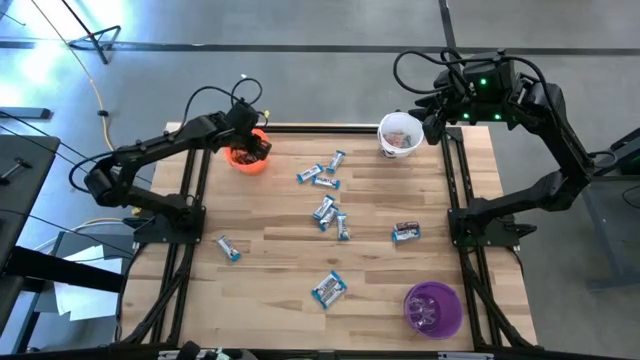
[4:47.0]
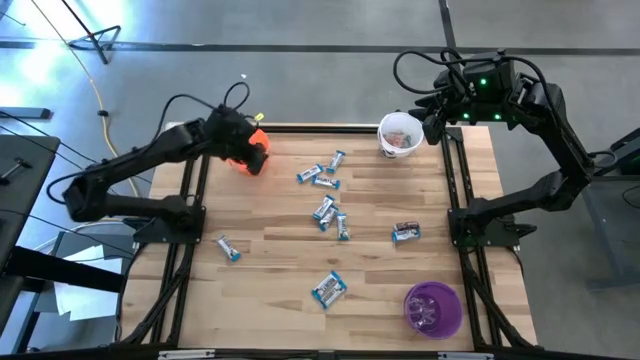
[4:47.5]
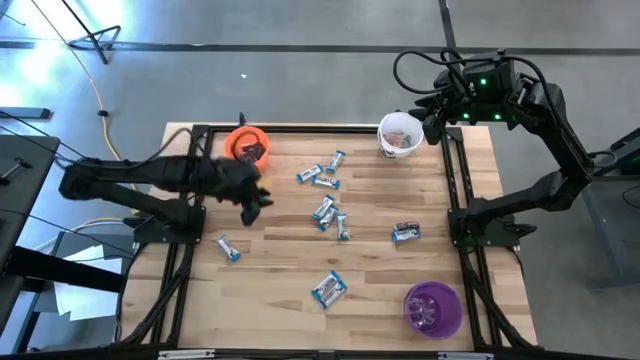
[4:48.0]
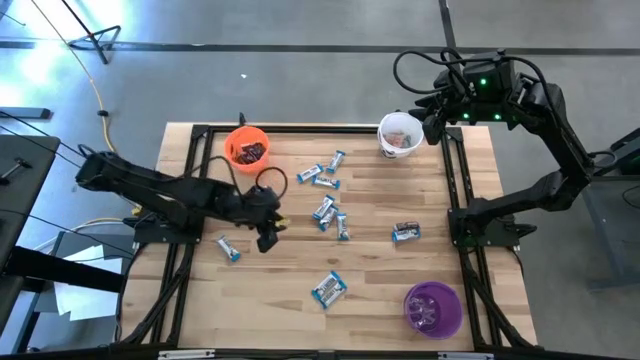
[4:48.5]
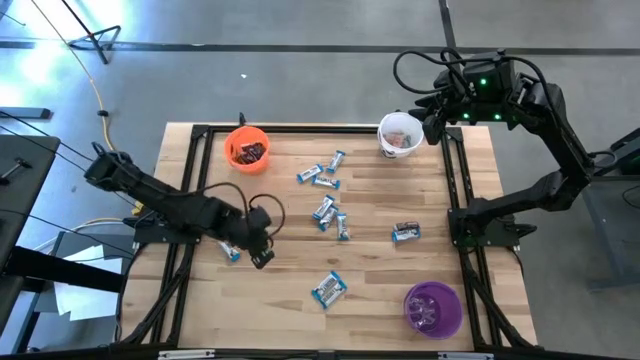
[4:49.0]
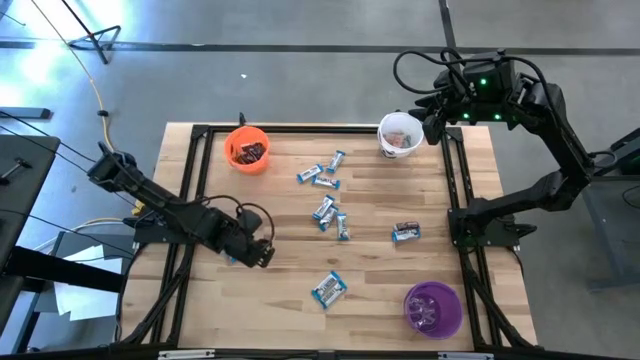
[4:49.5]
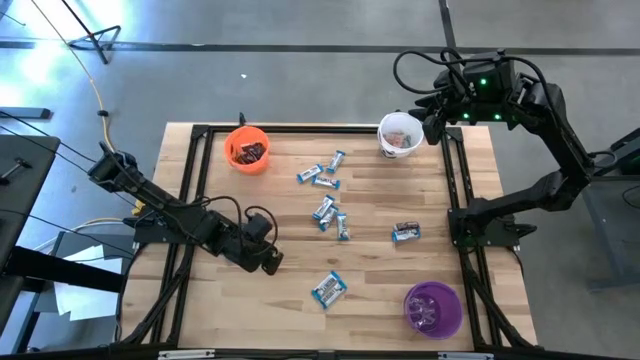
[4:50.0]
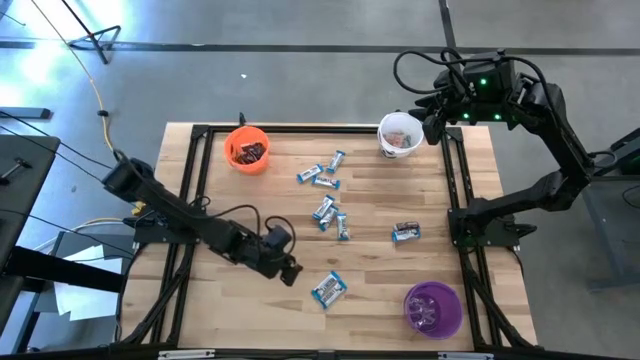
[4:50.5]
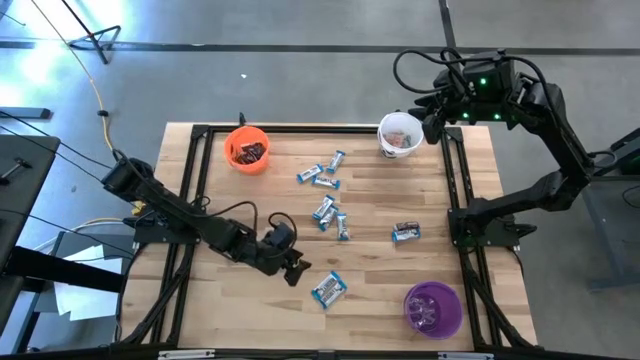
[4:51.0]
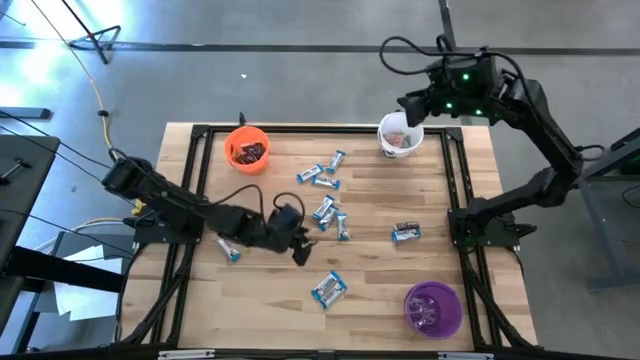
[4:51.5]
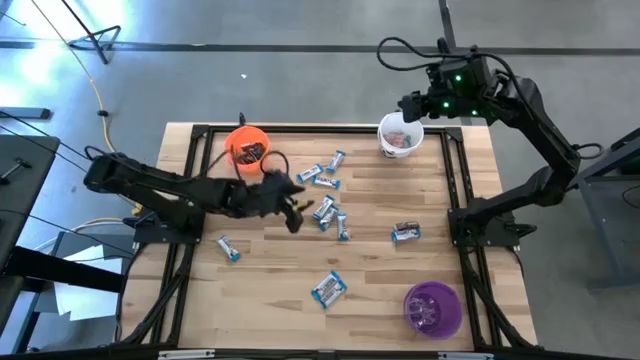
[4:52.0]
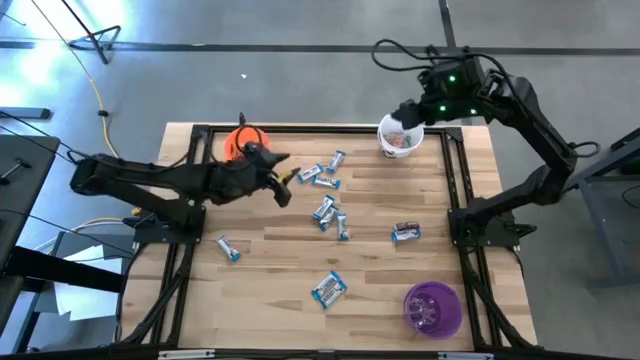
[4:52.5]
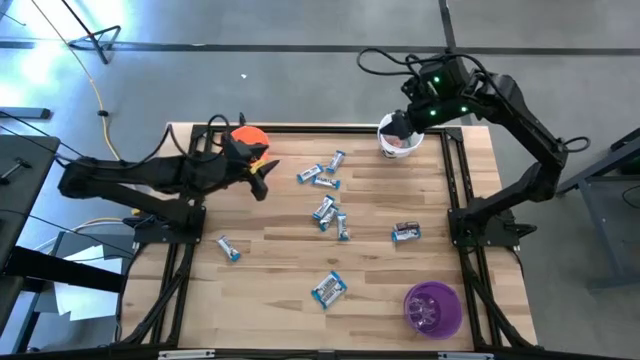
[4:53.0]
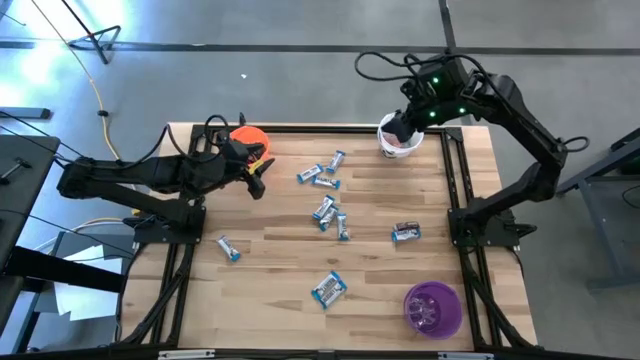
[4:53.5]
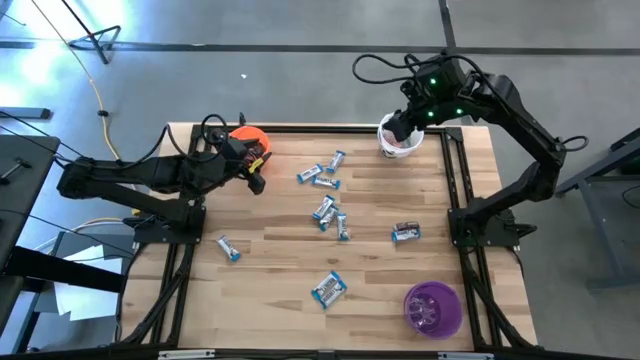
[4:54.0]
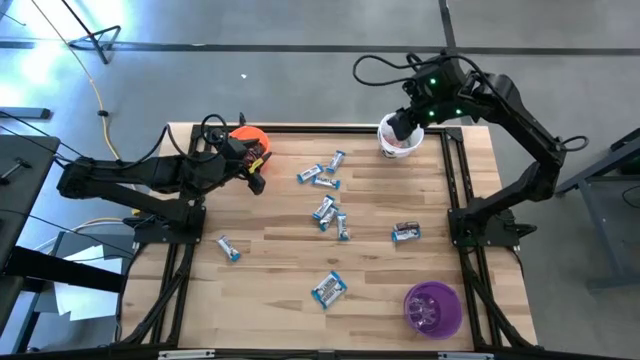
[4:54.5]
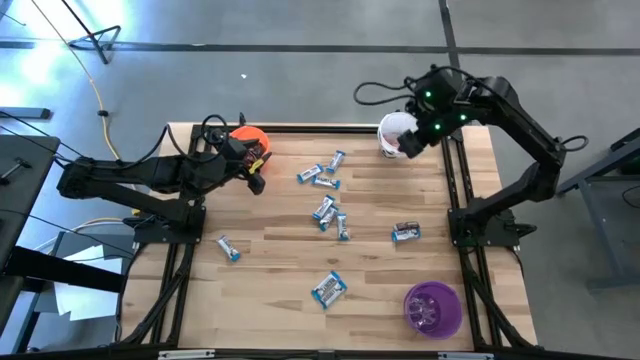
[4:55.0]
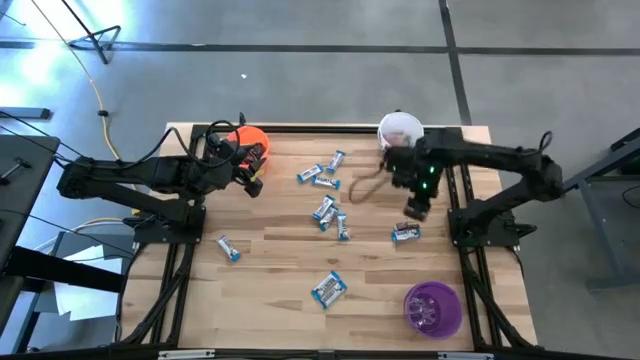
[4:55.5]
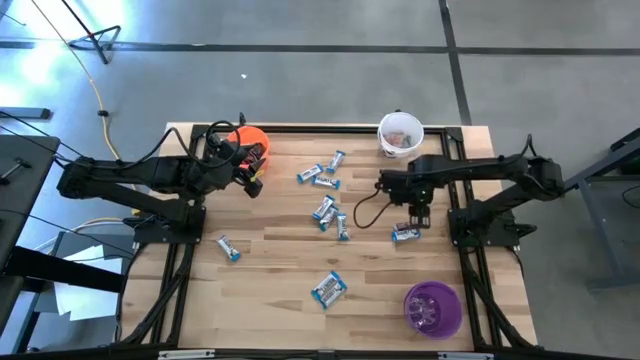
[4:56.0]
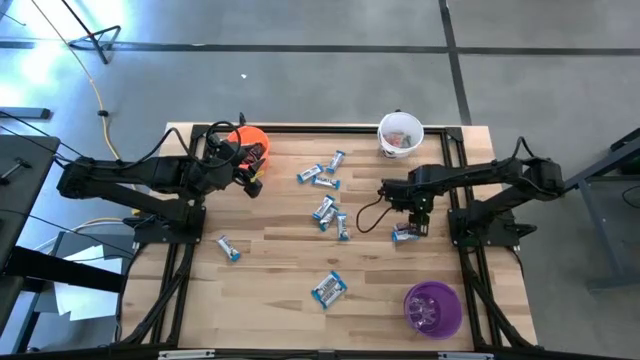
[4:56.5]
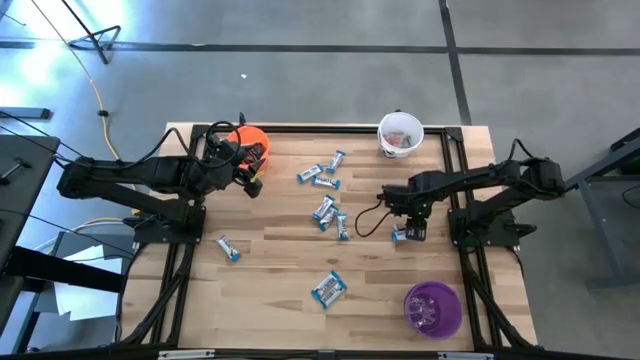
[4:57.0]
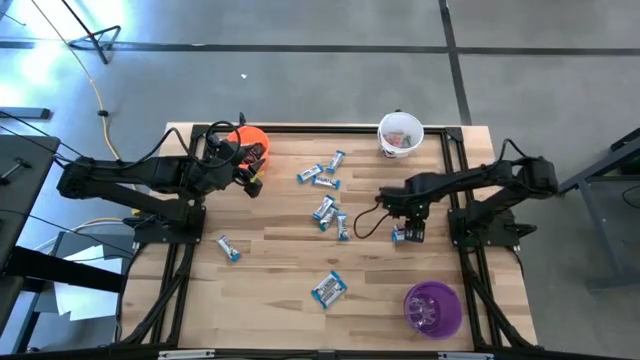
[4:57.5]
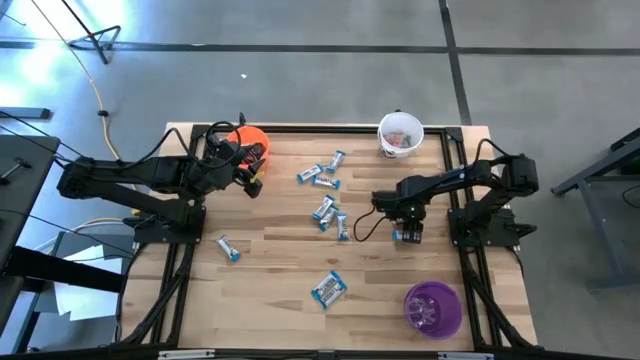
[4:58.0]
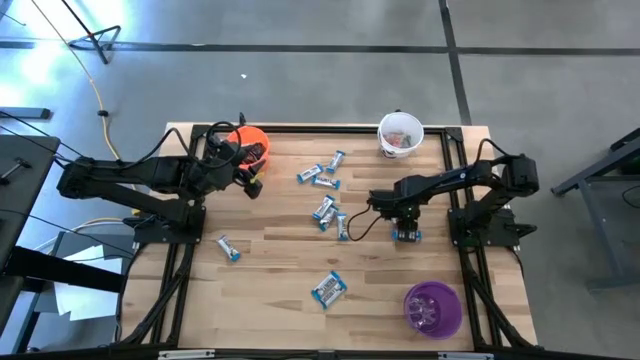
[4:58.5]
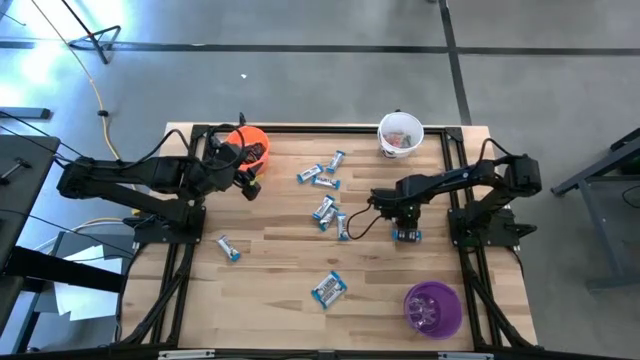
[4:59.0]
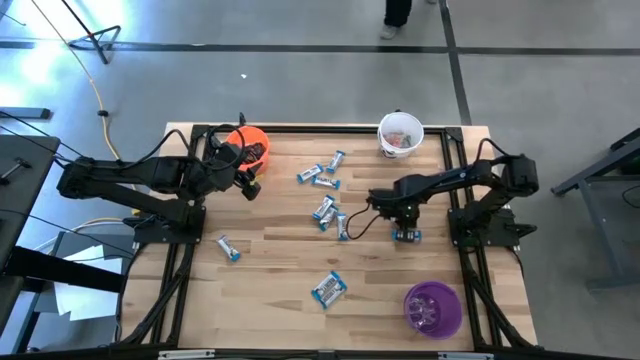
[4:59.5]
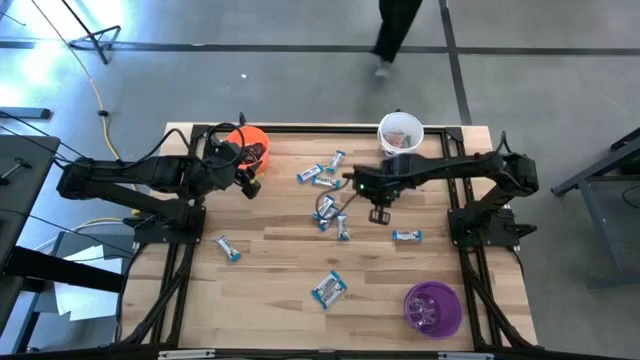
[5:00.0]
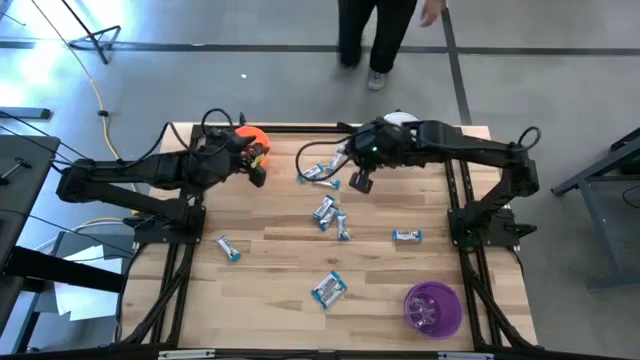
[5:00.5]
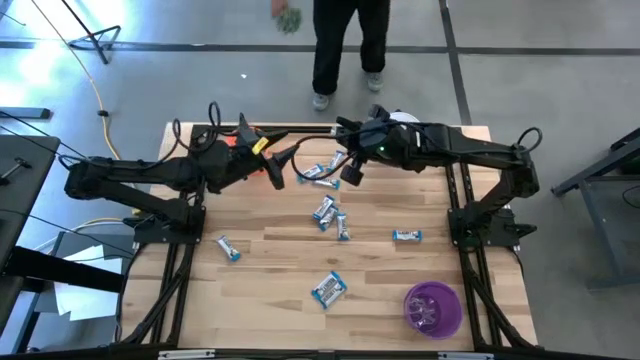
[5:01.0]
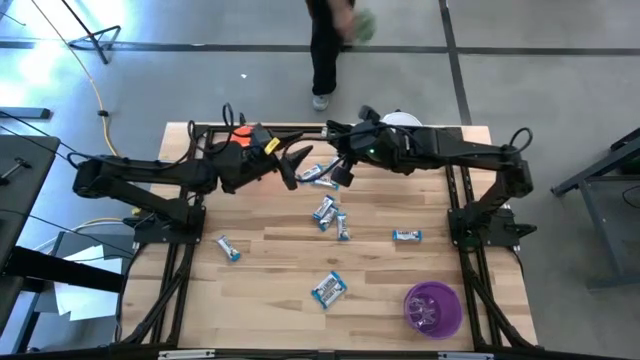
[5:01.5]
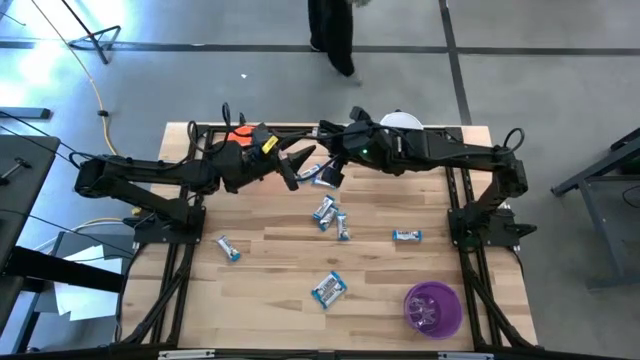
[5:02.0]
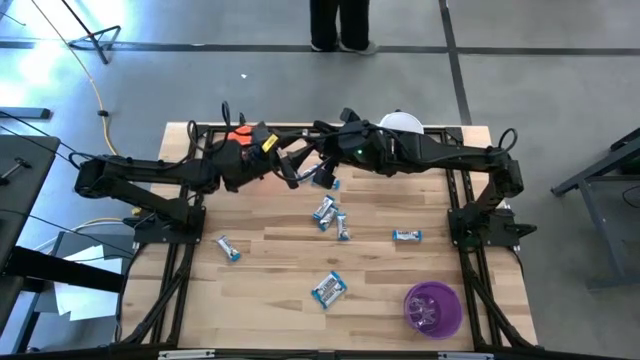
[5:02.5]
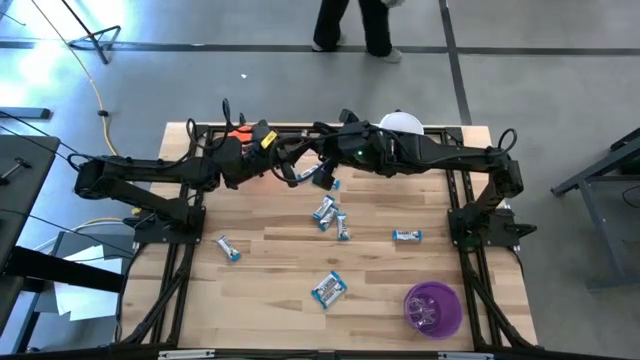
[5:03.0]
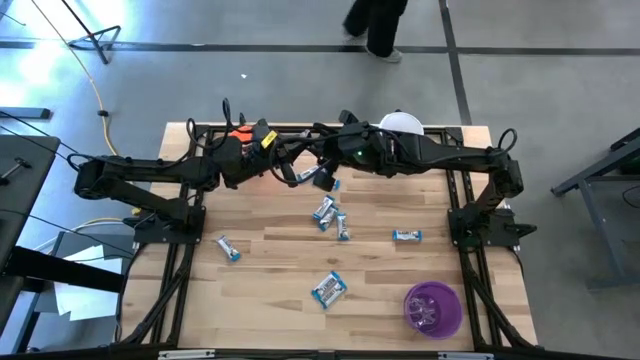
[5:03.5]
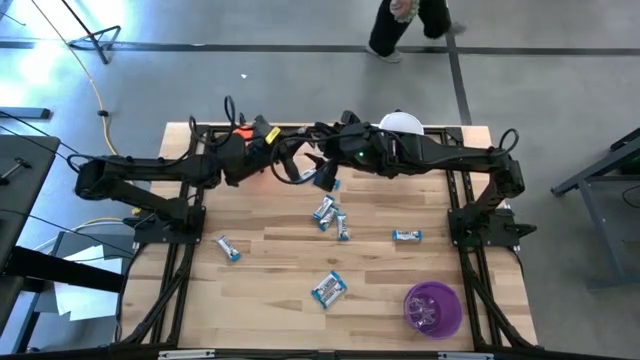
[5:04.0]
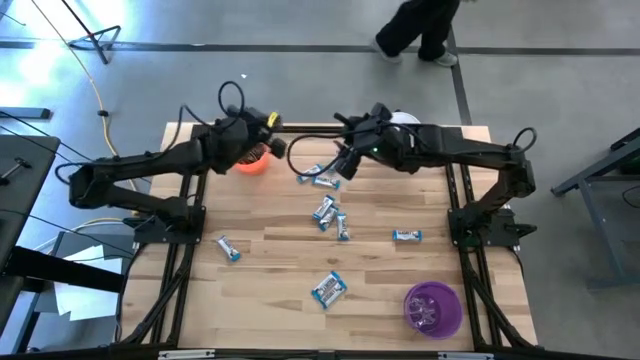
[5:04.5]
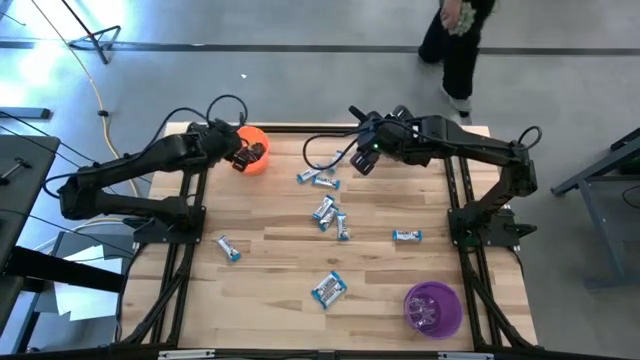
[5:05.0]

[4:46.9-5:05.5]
Task: Sort candy
Put the brown chocolate into the orange bucket

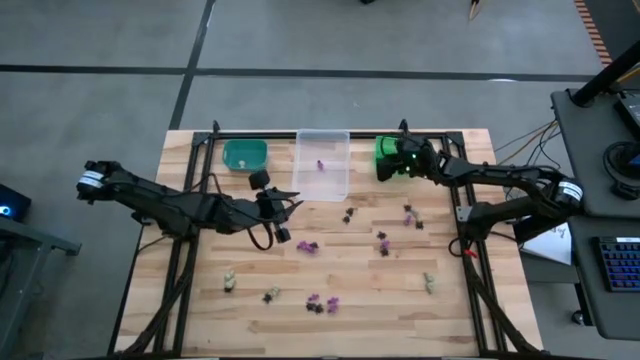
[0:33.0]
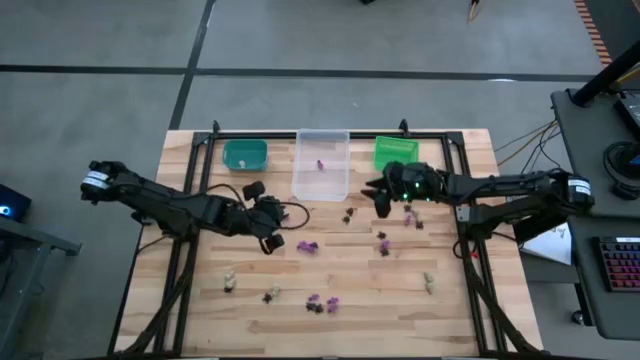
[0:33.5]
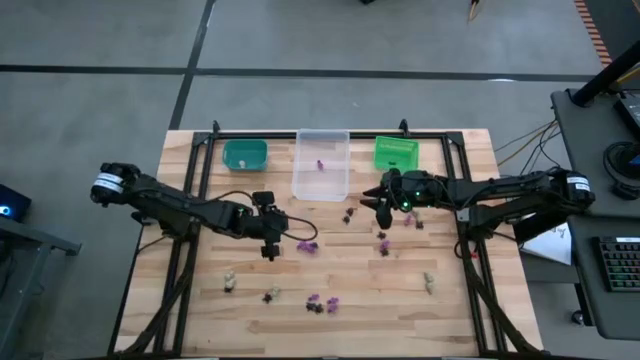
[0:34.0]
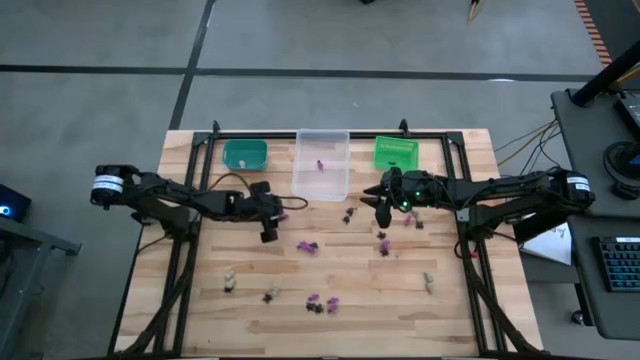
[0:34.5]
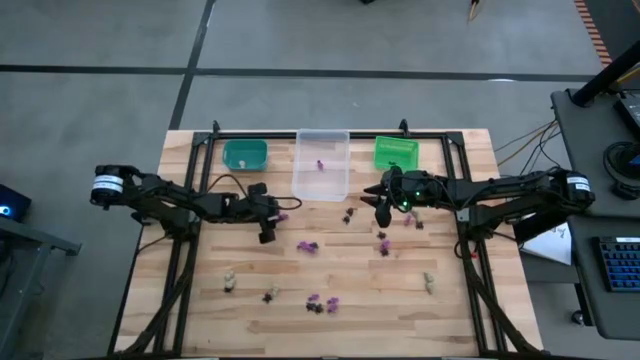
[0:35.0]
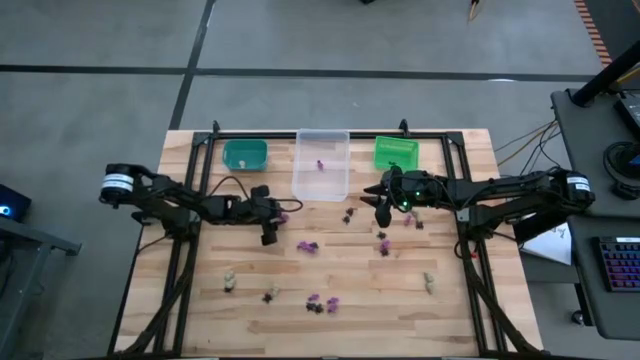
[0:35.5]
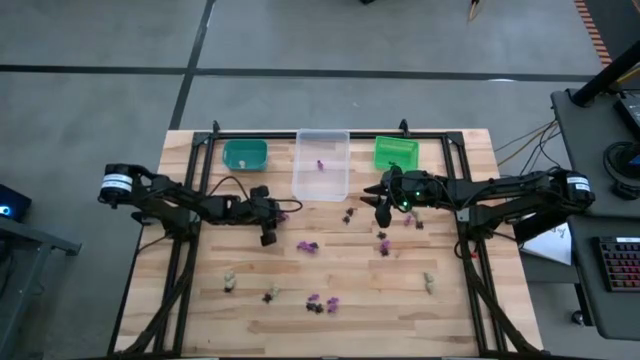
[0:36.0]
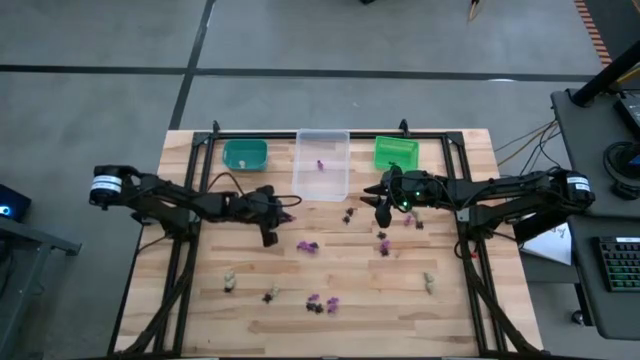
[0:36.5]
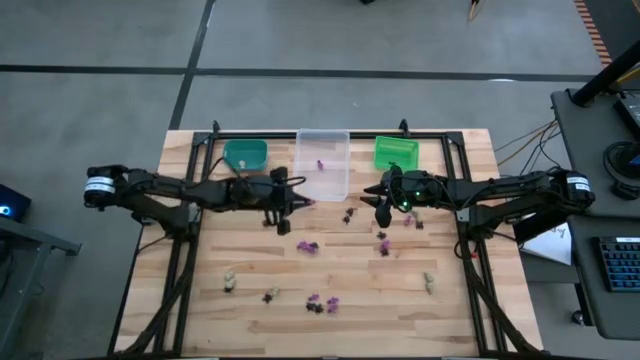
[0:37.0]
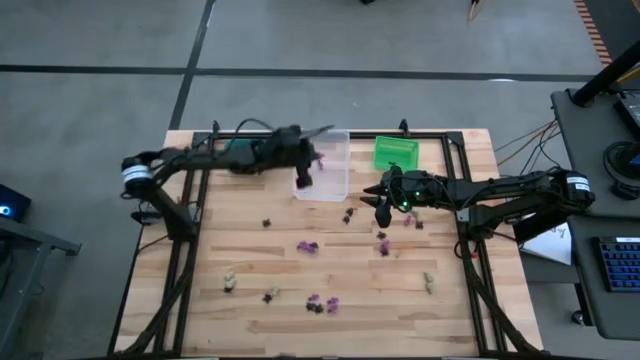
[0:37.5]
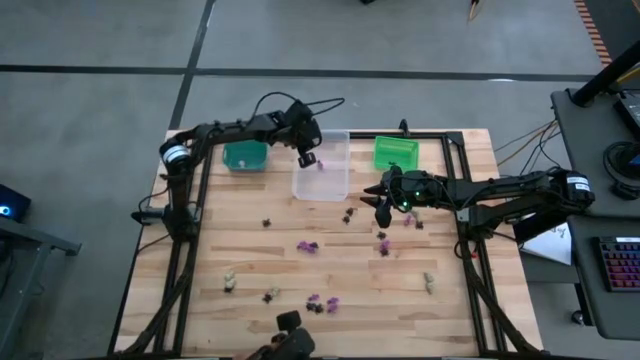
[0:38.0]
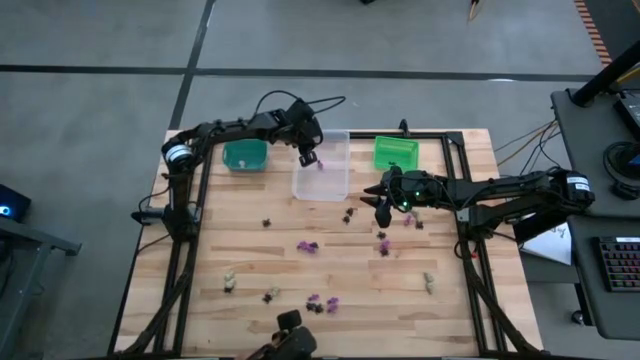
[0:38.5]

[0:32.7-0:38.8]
Task: Sort Halloween decoration
Put the violet skeleton toy into the transparent bin
